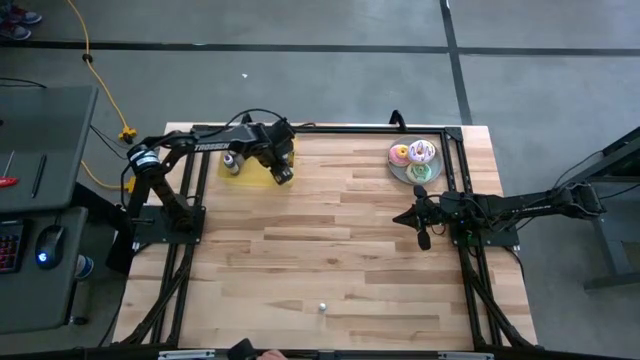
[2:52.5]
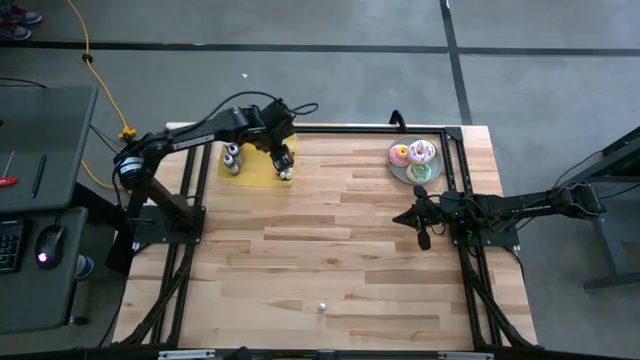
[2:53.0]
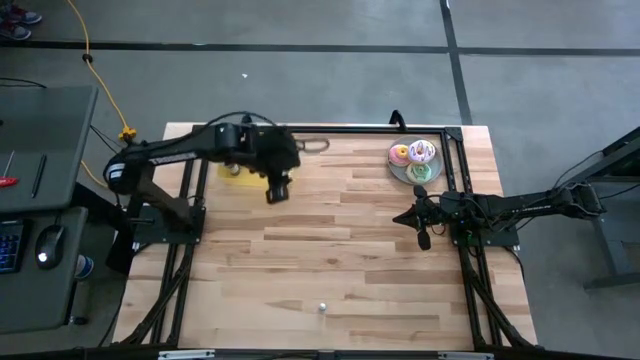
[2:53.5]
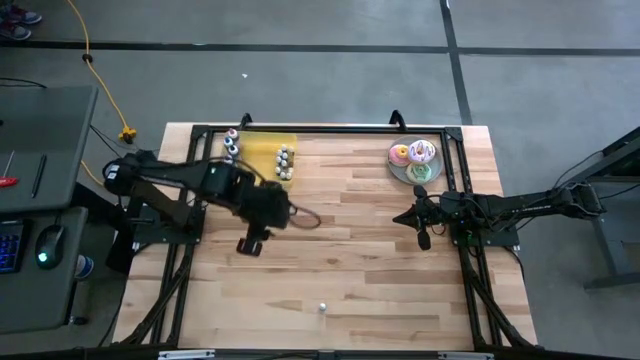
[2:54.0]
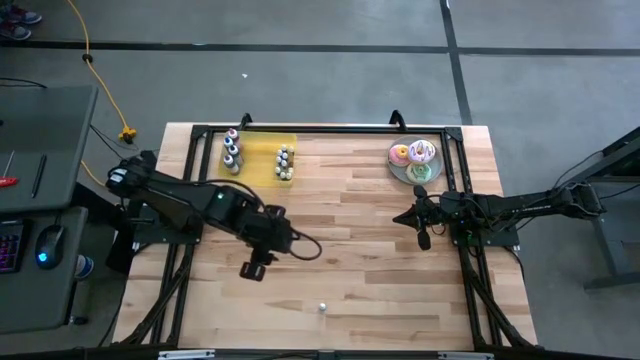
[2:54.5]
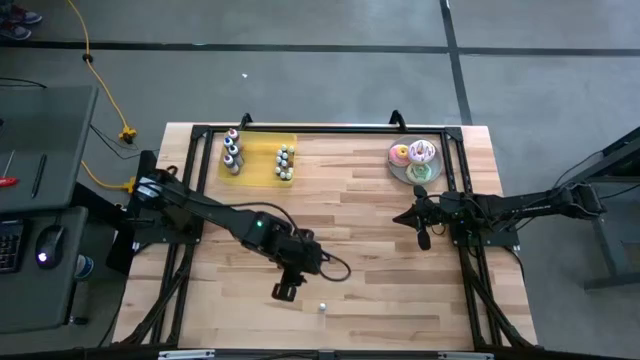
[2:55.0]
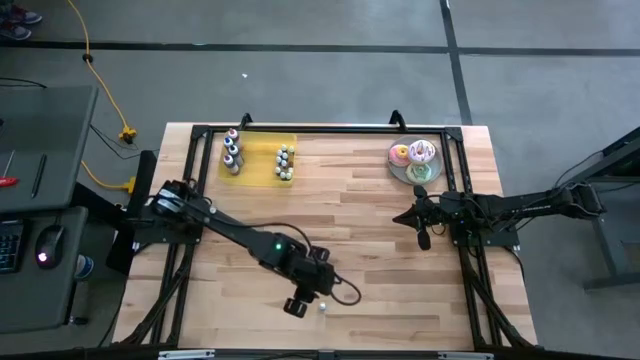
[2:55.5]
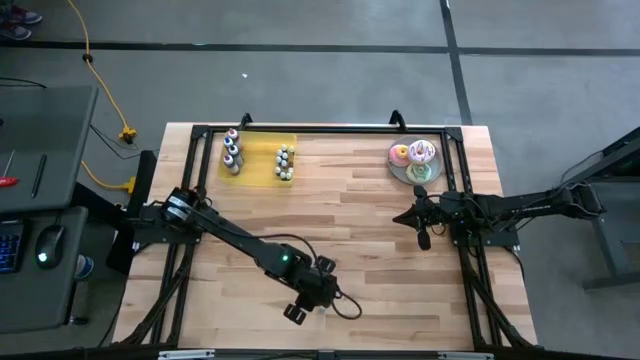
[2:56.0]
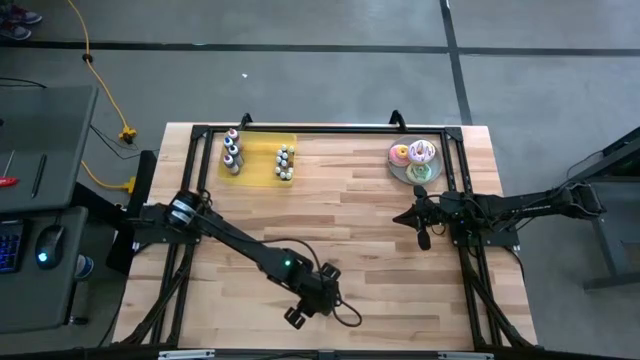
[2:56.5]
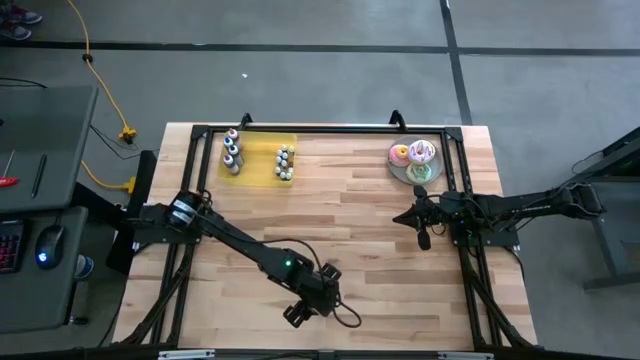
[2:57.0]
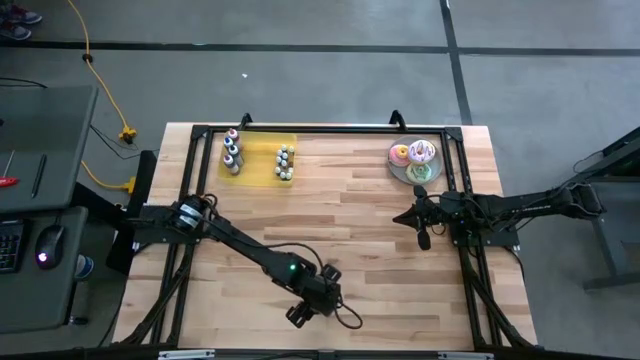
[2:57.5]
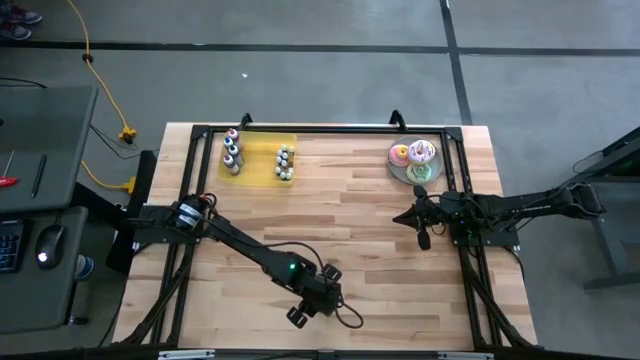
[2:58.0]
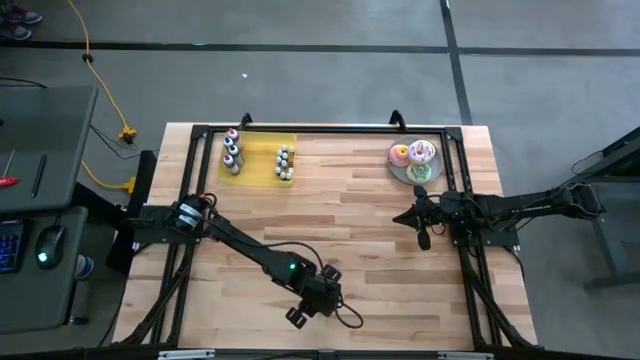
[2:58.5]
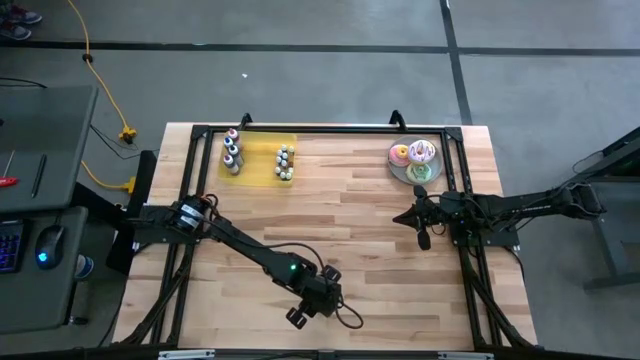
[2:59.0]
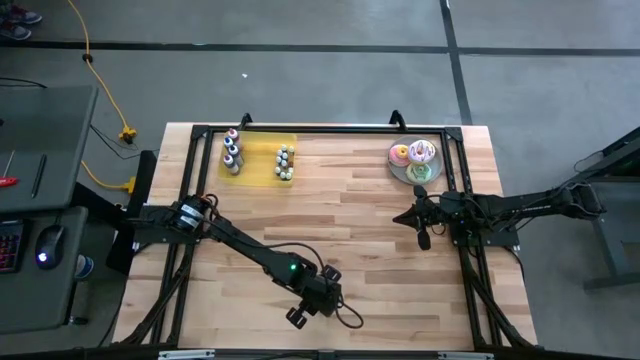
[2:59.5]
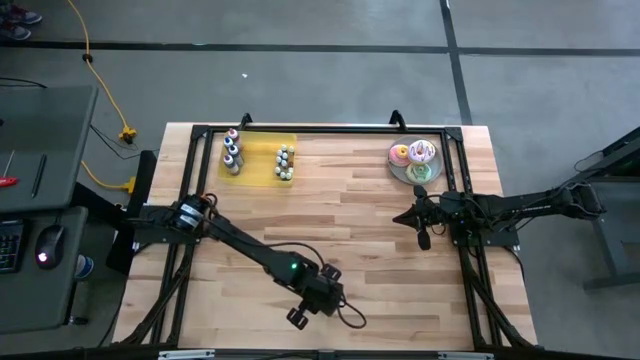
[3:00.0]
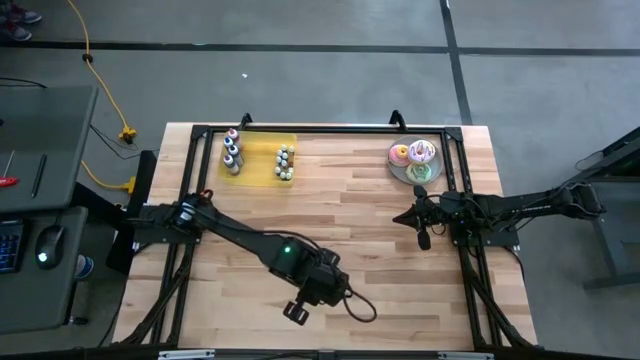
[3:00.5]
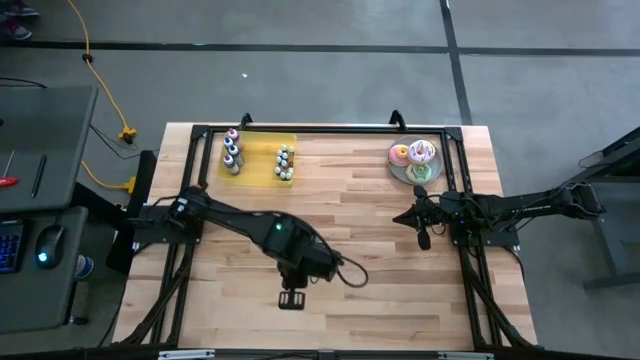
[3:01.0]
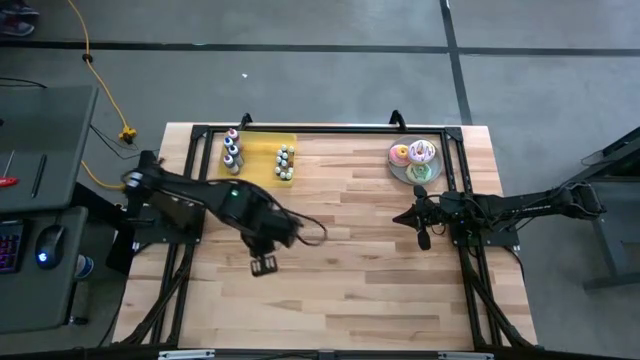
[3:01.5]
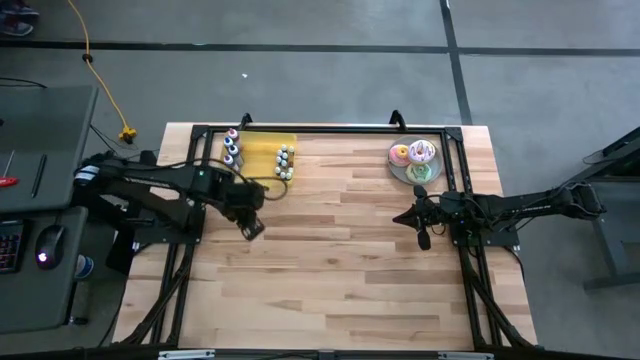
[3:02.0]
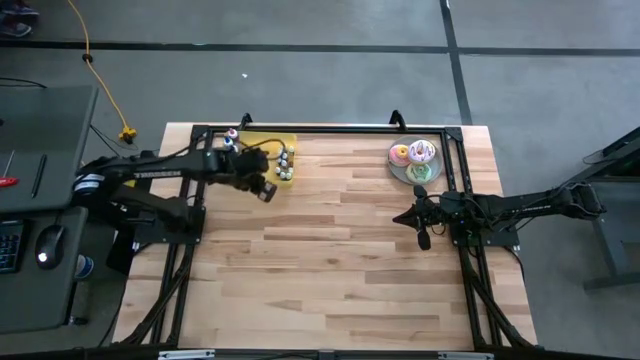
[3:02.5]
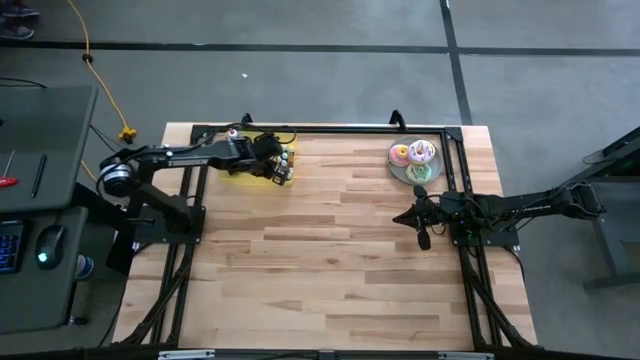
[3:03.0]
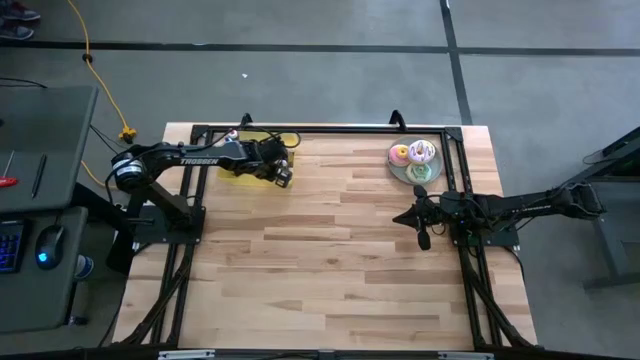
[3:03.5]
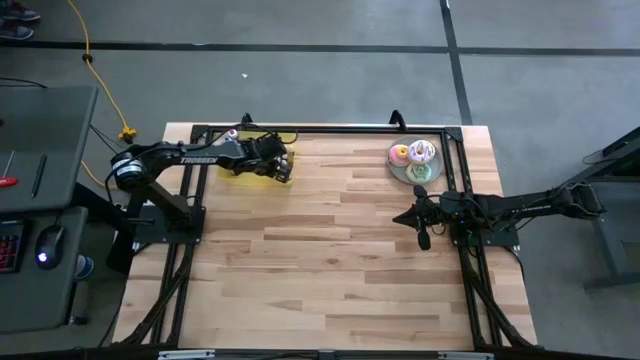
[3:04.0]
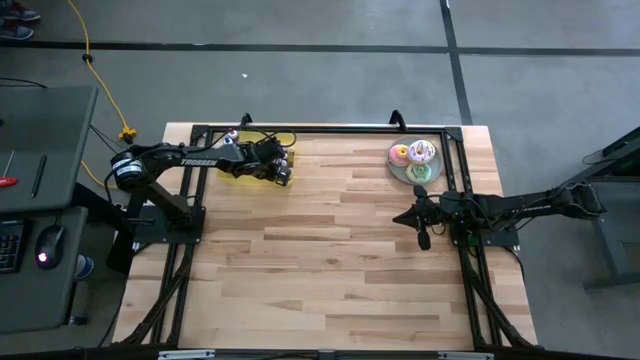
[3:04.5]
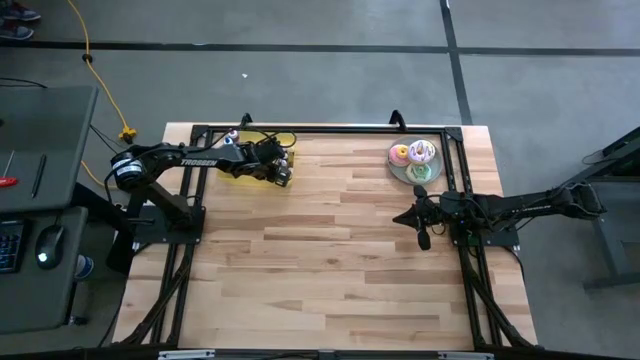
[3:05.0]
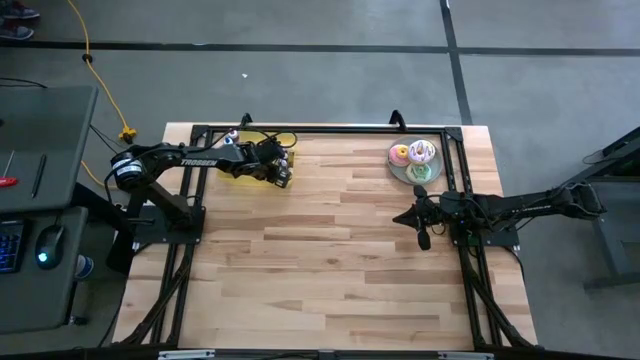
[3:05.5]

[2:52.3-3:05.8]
Task: Pick & Place food coloring
Put the small green food coloring bottle into the yellow bin

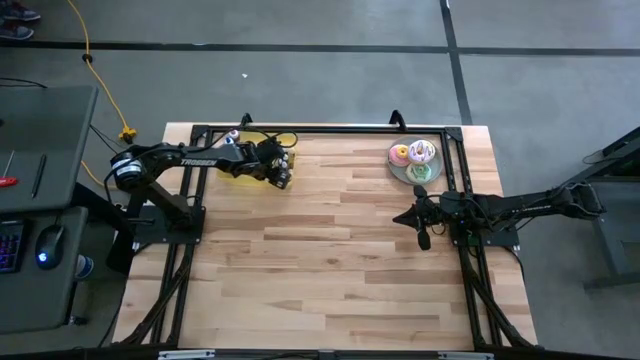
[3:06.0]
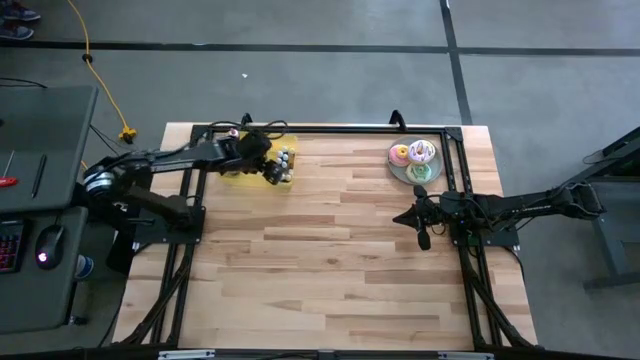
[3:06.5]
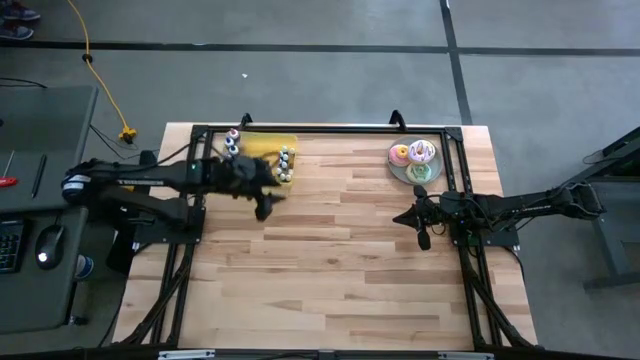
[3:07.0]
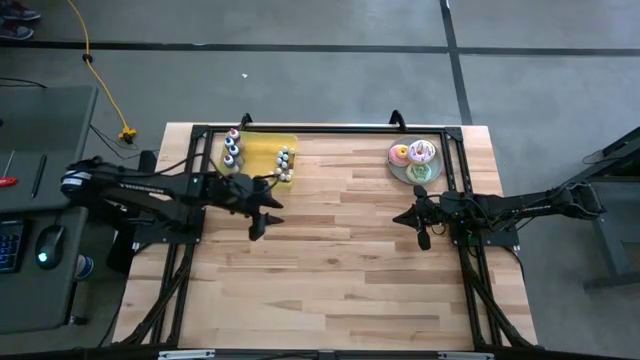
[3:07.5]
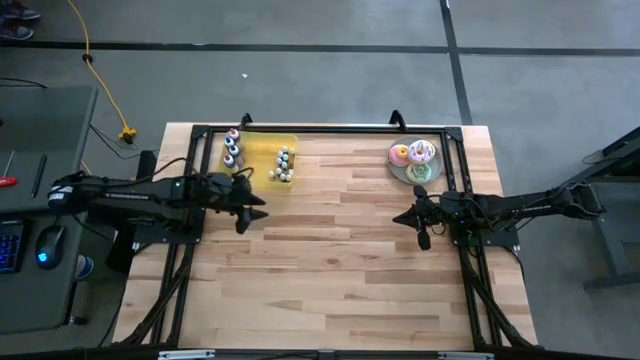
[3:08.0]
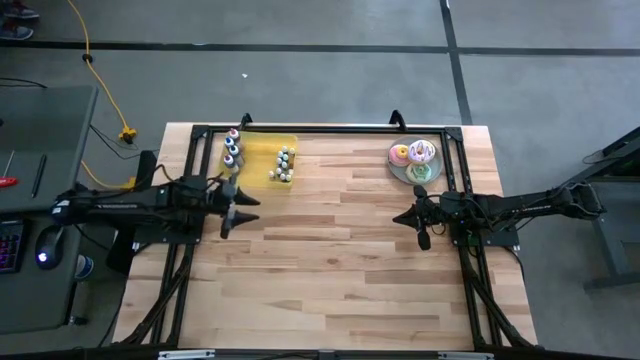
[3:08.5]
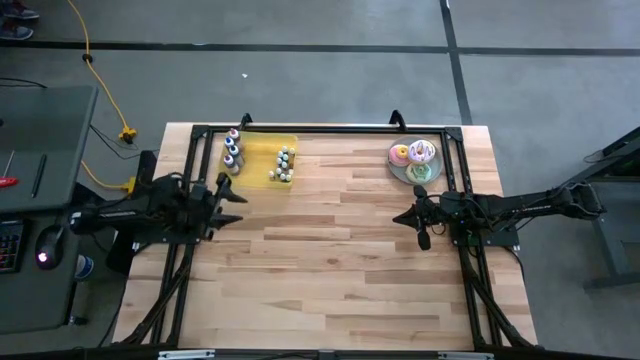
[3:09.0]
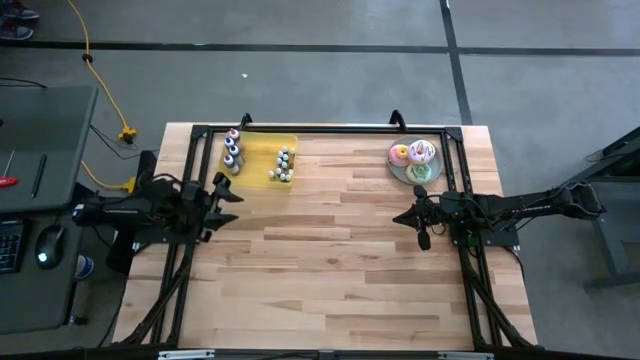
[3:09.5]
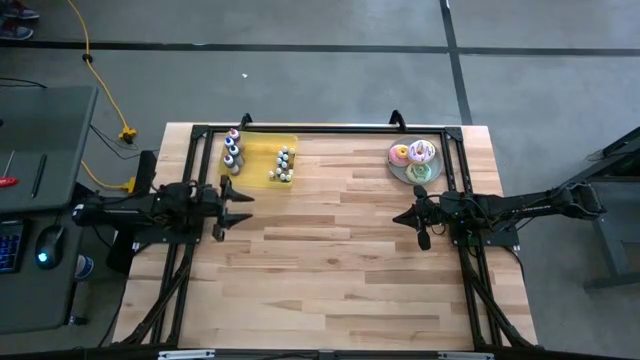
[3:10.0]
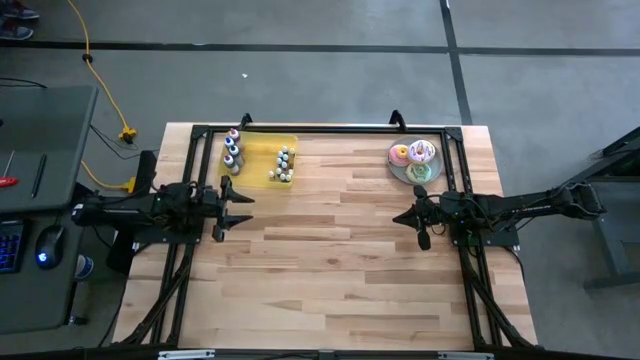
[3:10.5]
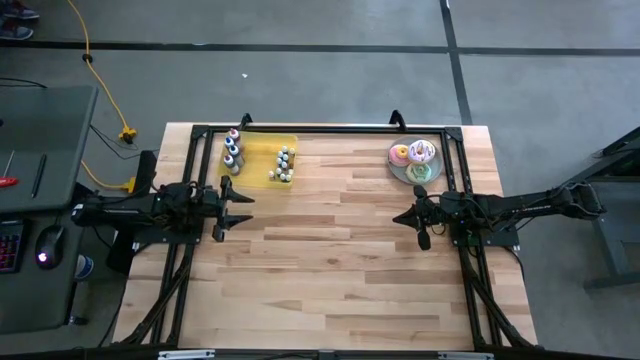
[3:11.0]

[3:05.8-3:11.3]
Return to Home Position

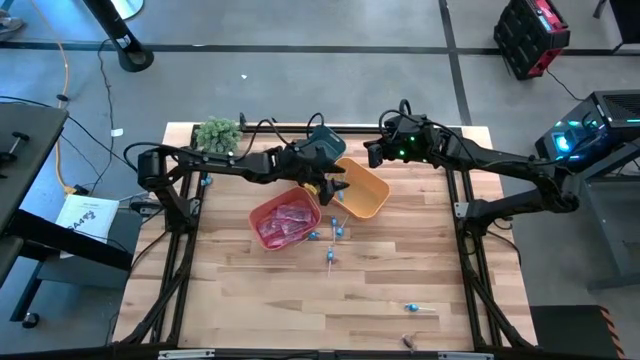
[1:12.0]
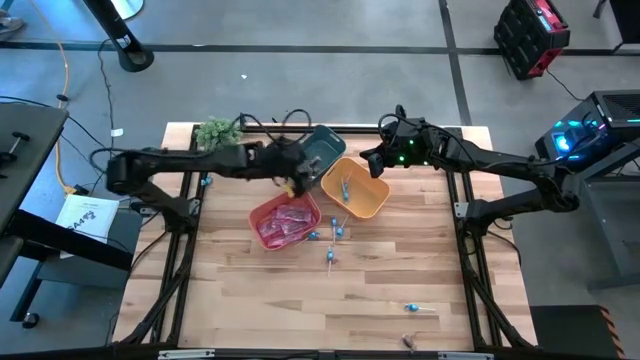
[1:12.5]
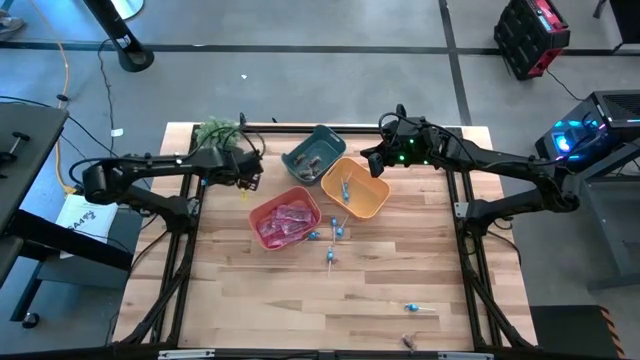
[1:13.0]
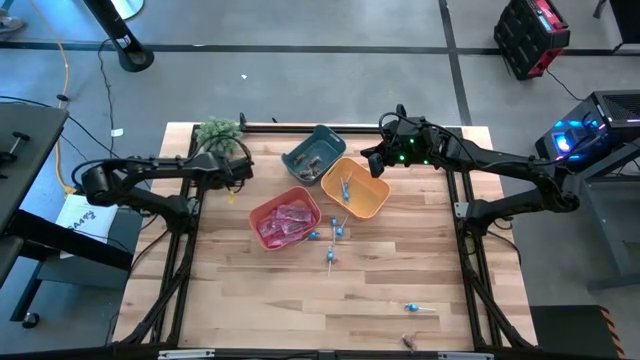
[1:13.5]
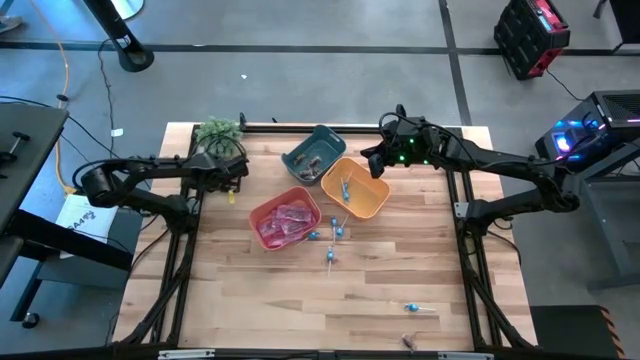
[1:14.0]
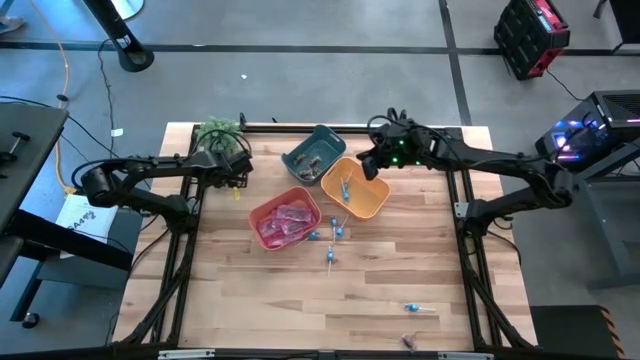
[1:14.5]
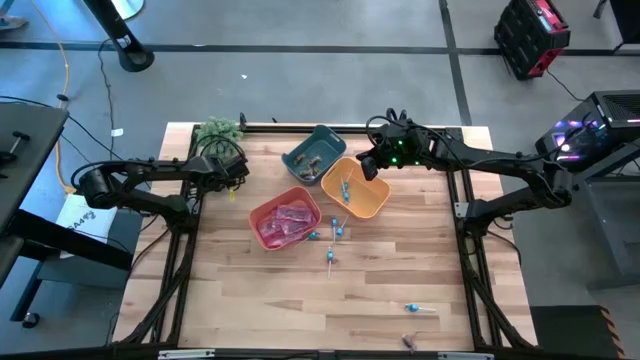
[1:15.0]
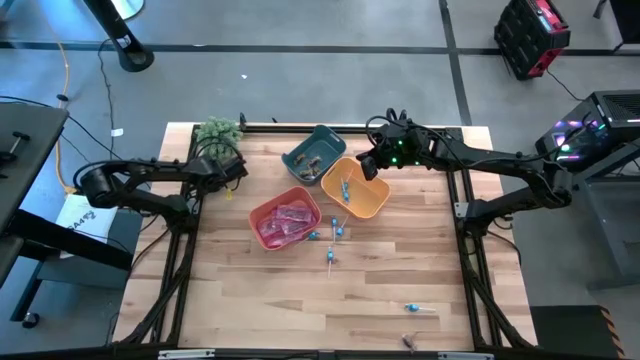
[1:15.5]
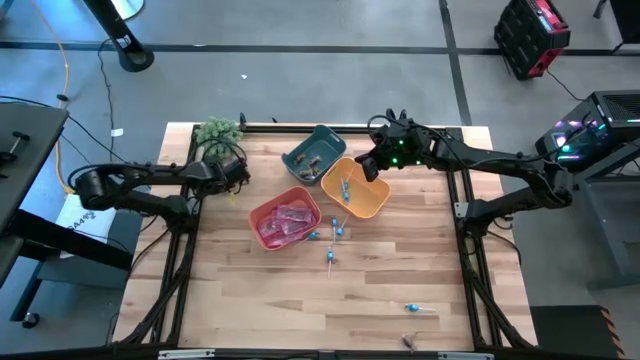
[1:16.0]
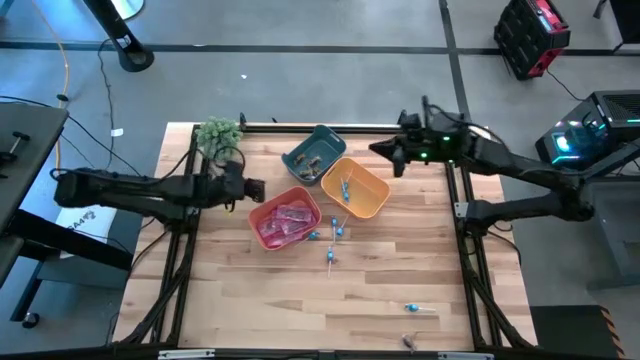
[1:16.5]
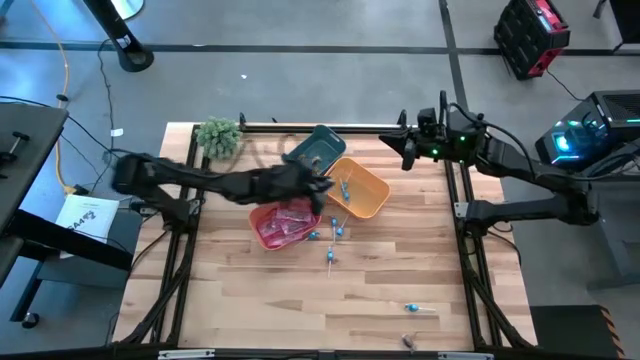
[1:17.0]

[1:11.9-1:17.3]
Task: Sort candy
Put the blue candy into the yellow bin
